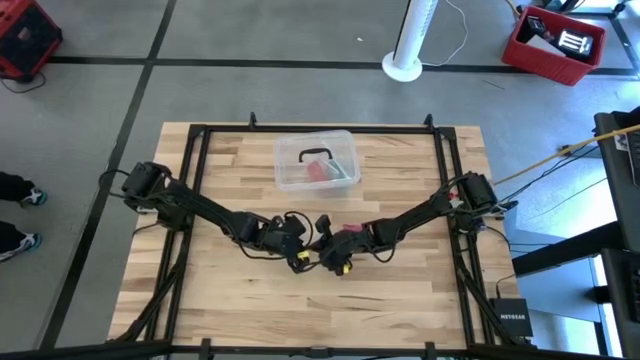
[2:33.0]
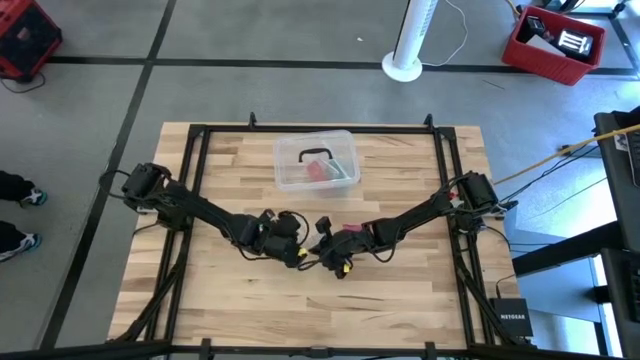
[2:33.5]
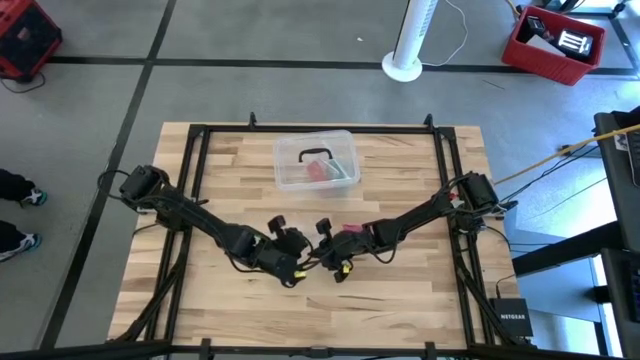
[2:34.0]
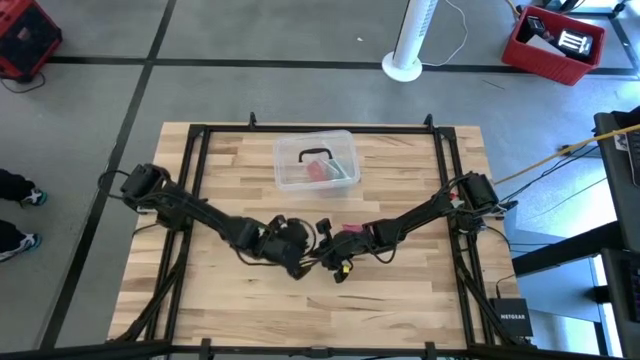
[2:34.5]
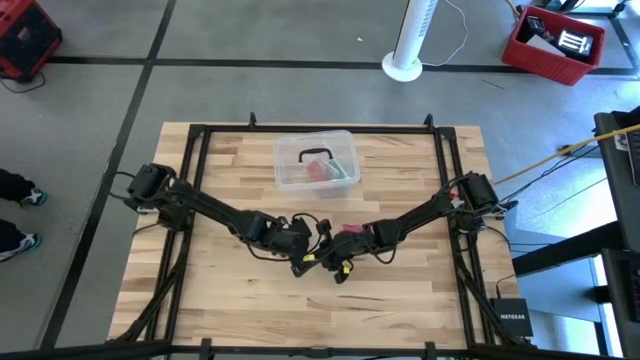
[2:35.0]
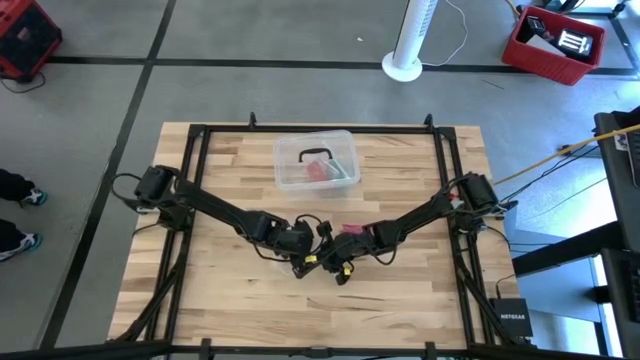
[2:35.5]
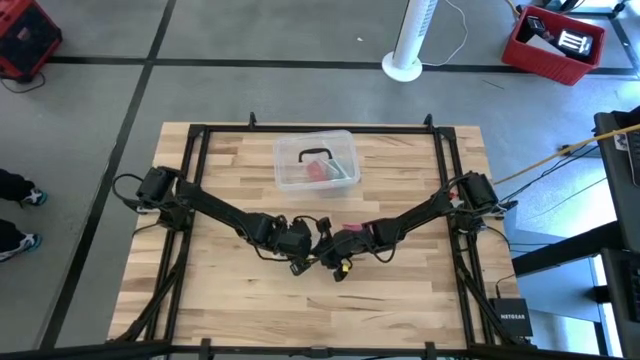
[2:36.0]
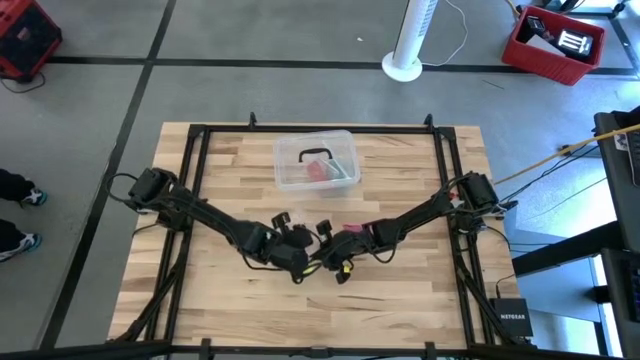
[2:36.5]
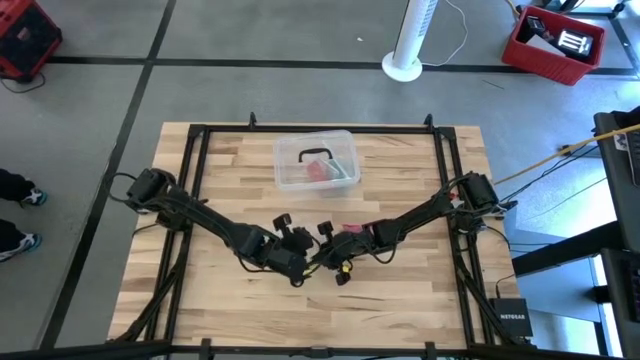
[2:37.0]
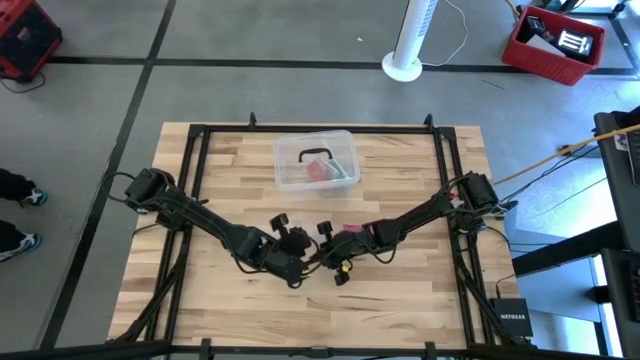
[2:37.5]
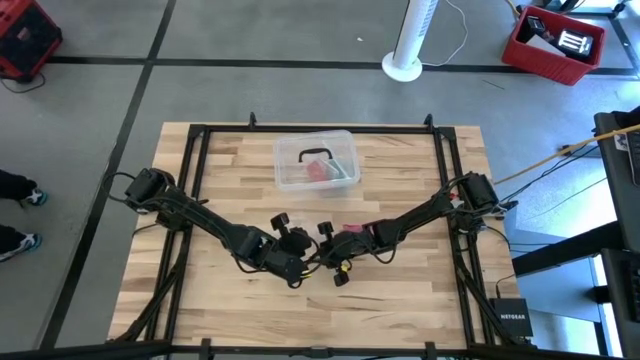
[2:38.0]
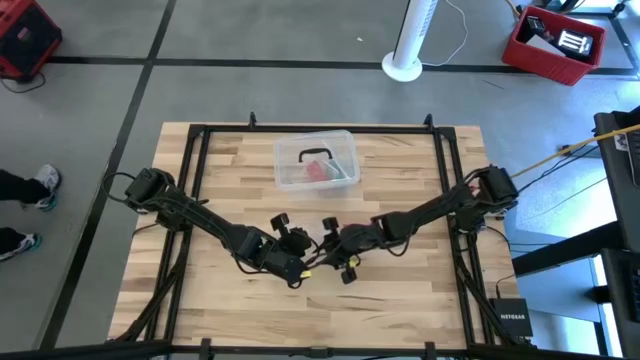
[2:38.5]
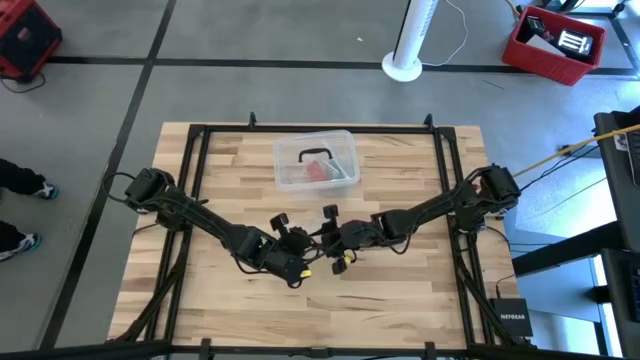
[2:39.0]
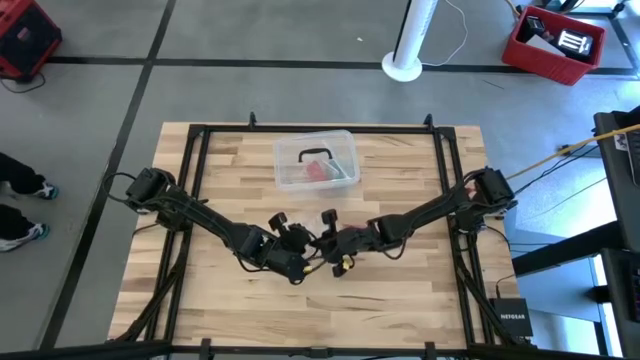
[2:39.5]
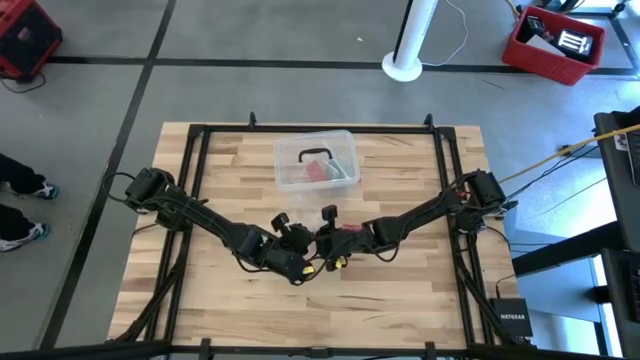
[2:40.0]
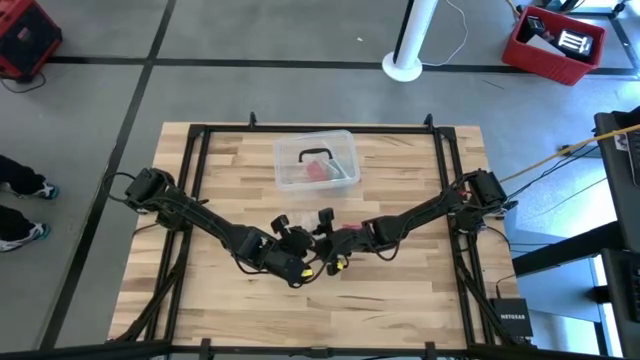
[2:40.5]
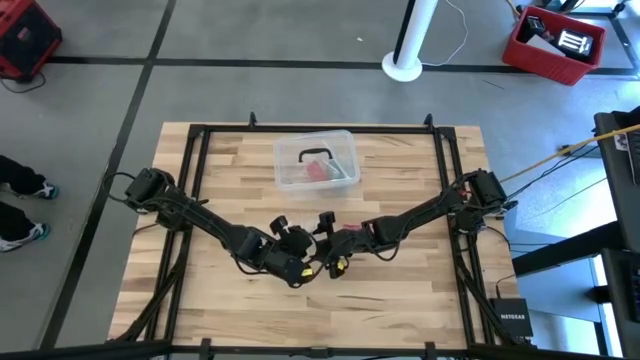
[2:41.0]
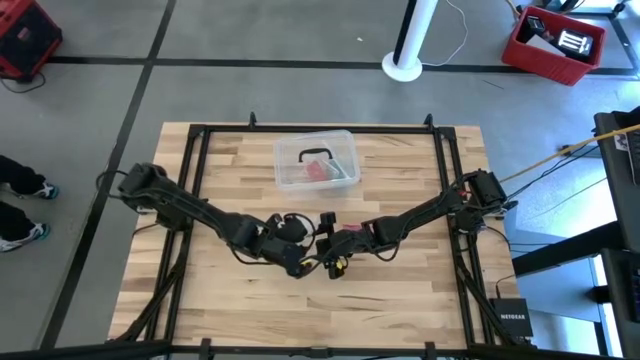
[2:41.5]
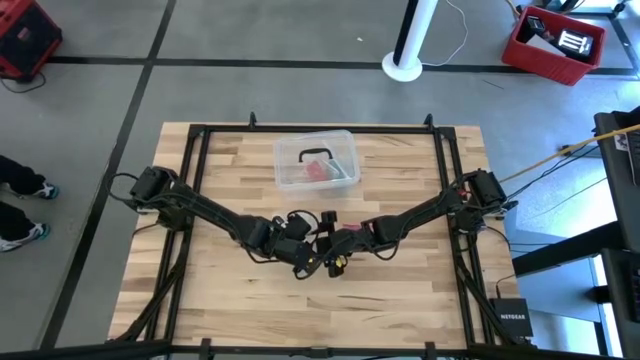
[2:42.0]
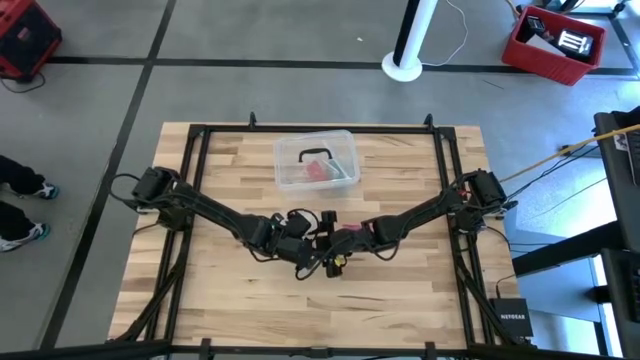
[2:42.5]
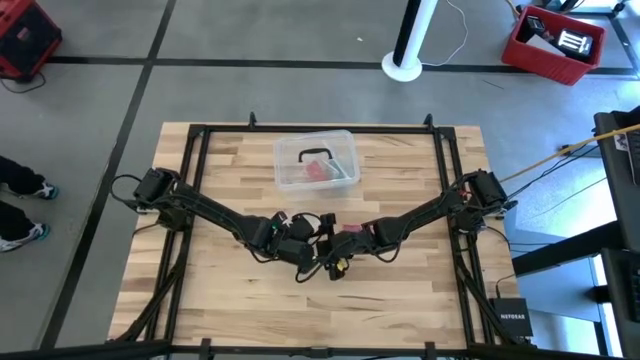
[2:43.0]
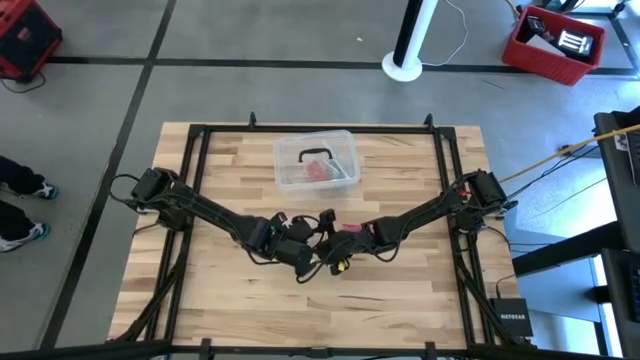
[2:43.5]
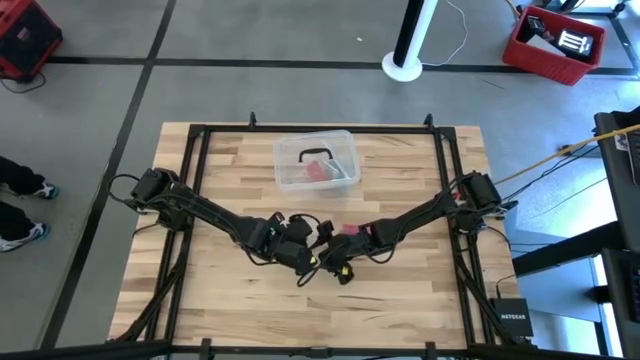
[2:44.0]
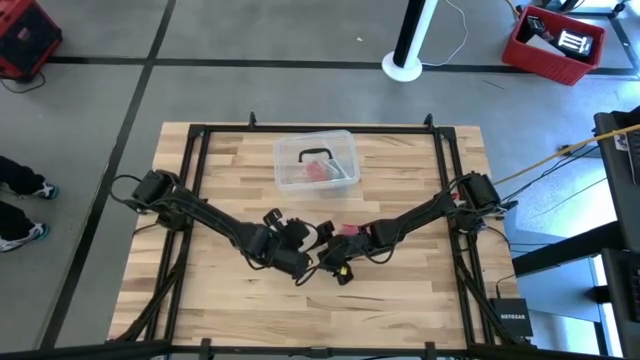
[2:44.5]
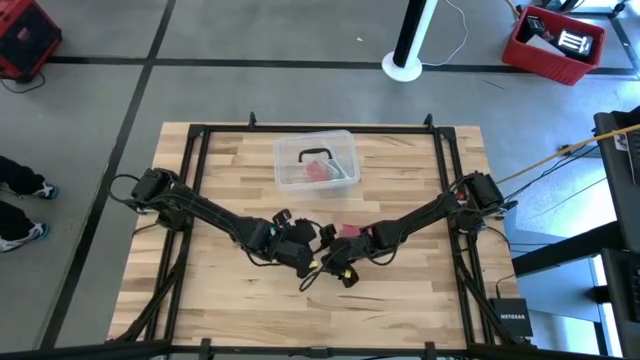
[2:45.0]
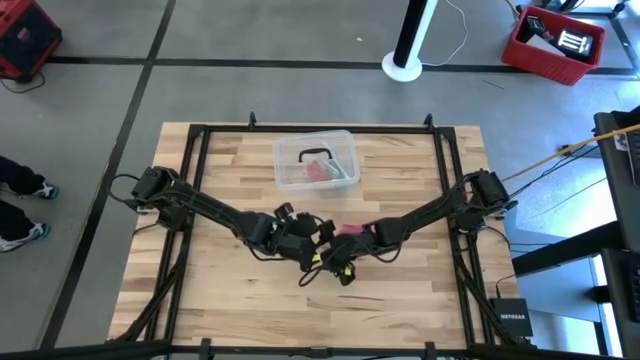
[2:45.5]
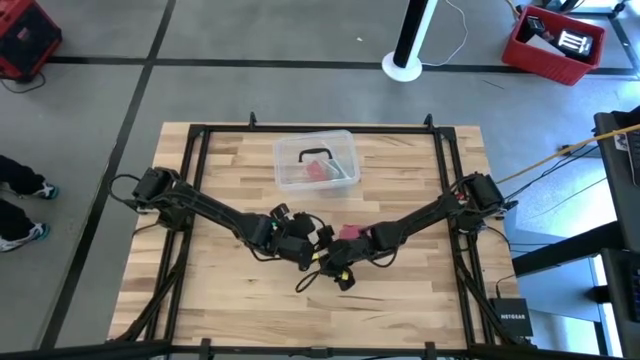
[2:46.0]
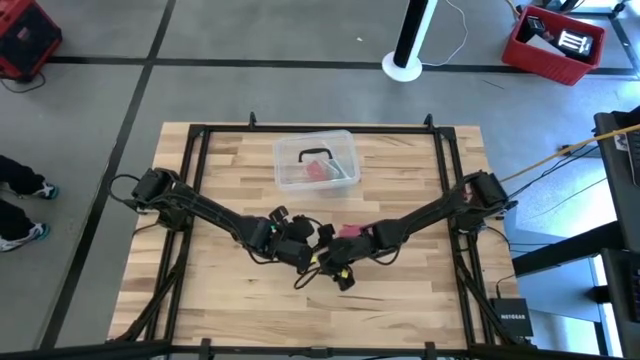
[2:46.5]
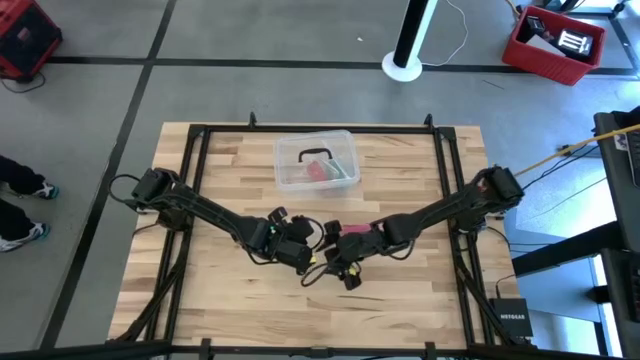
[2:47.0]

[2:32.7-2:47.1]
Task: Roll bandage
Open the transparent zip bag

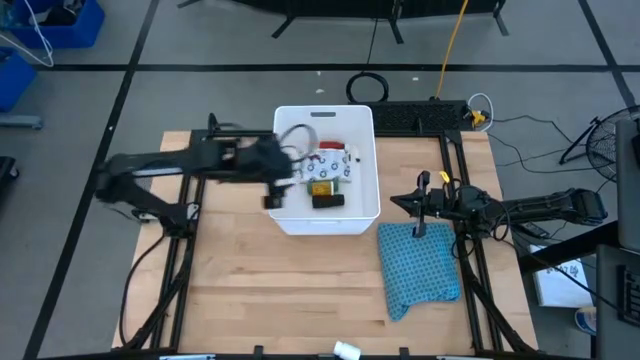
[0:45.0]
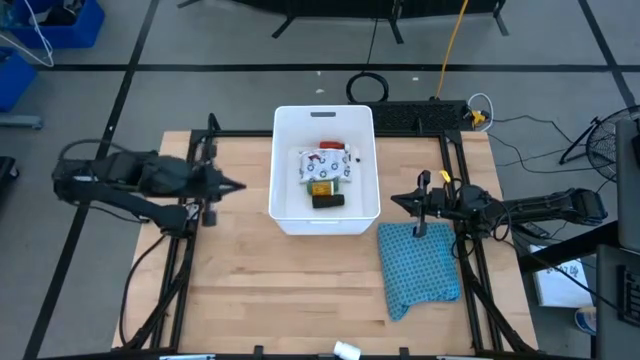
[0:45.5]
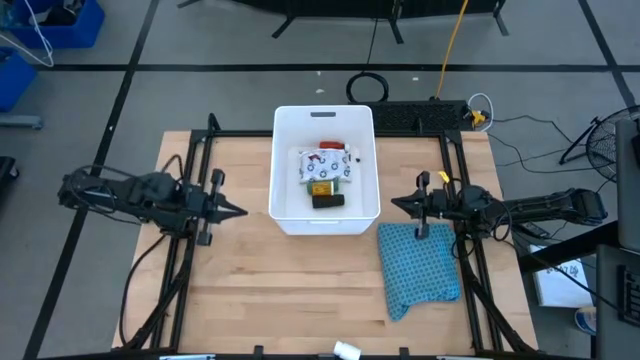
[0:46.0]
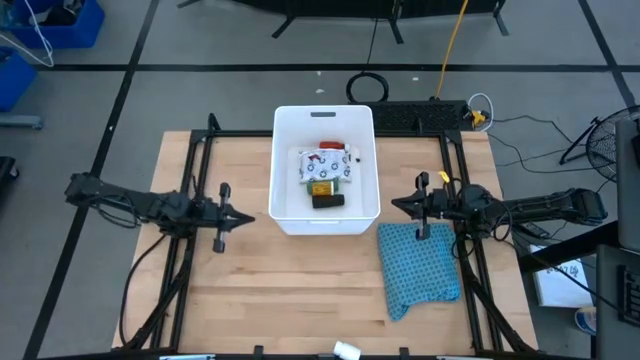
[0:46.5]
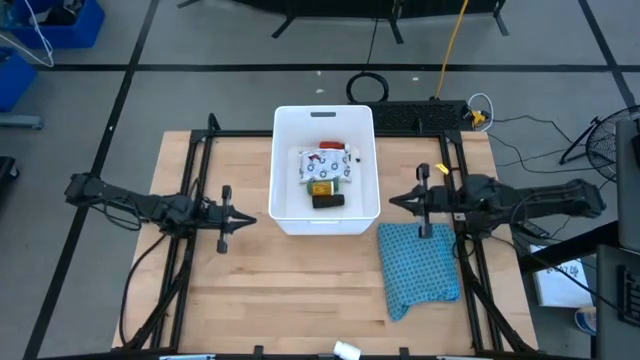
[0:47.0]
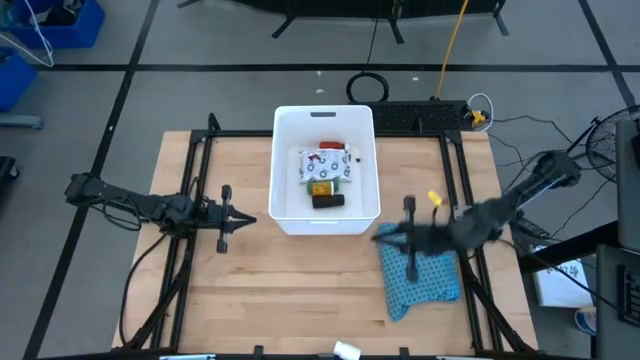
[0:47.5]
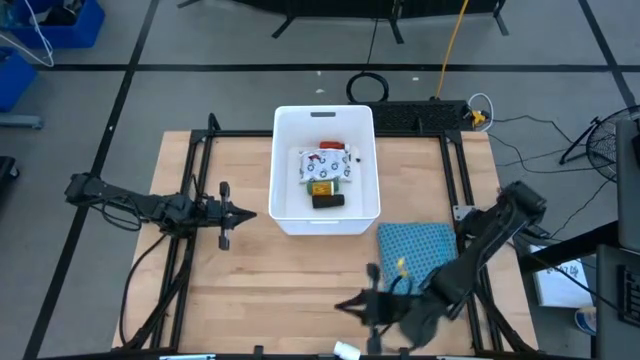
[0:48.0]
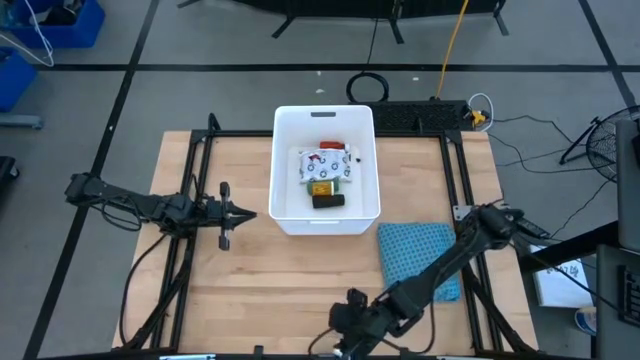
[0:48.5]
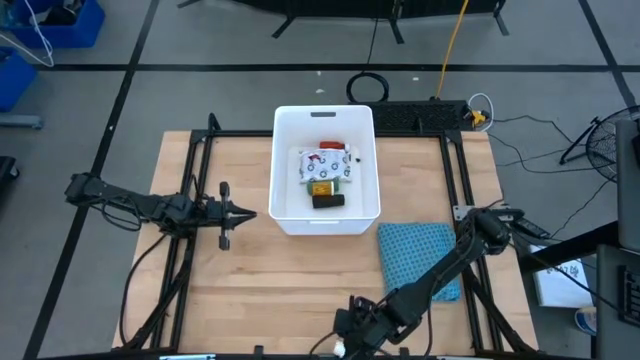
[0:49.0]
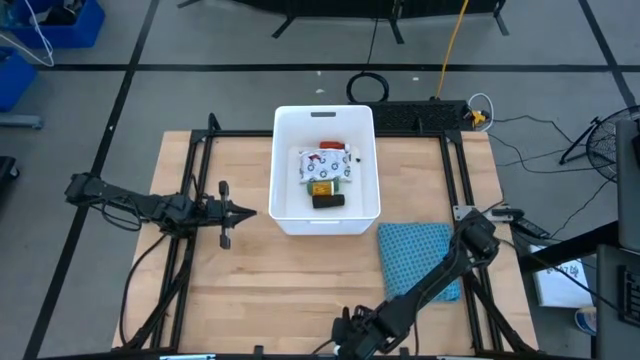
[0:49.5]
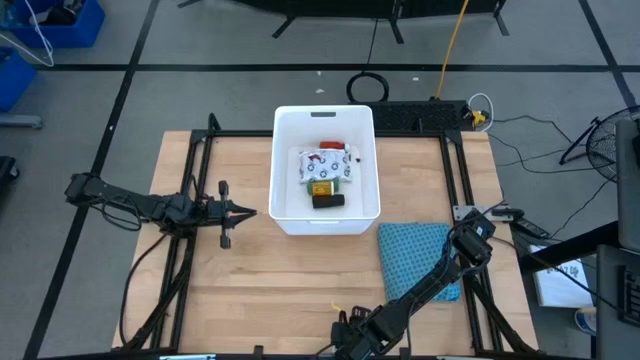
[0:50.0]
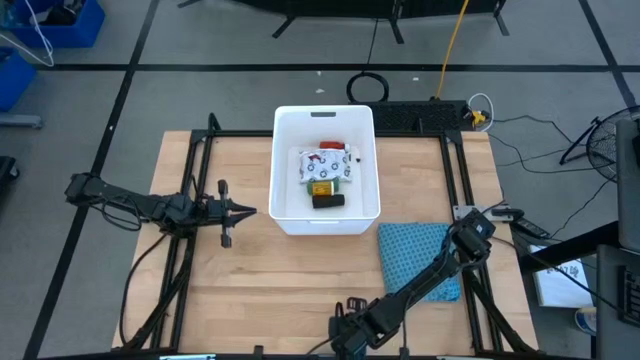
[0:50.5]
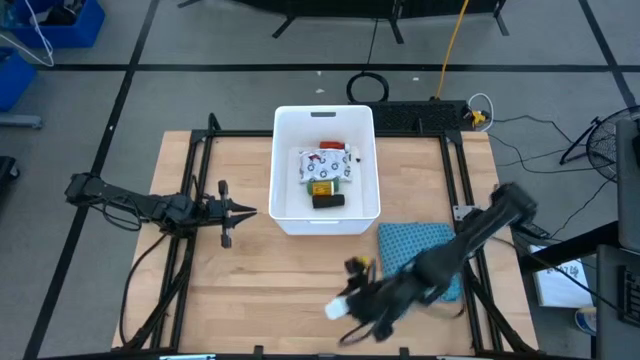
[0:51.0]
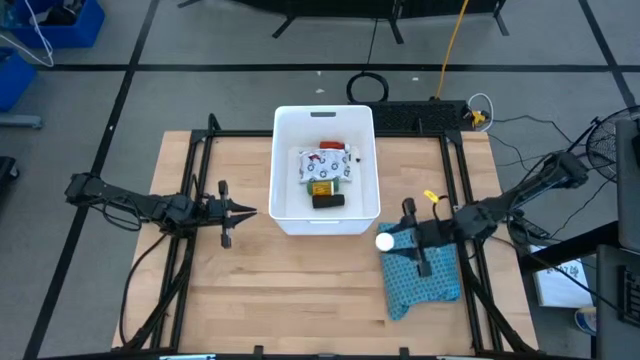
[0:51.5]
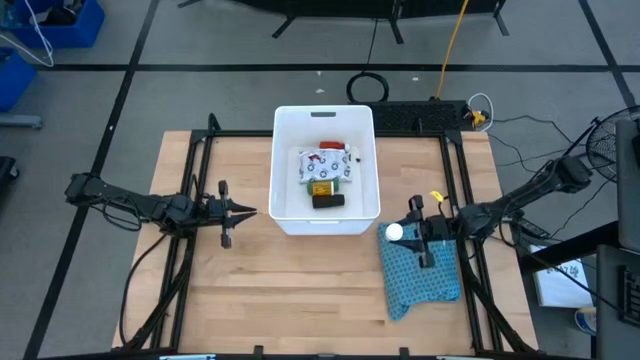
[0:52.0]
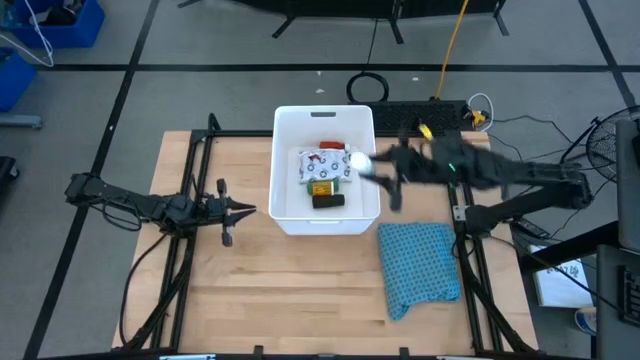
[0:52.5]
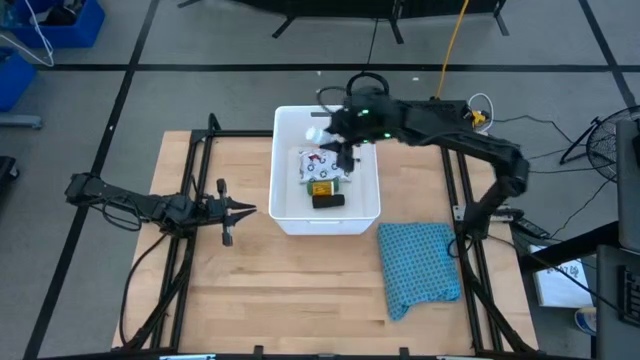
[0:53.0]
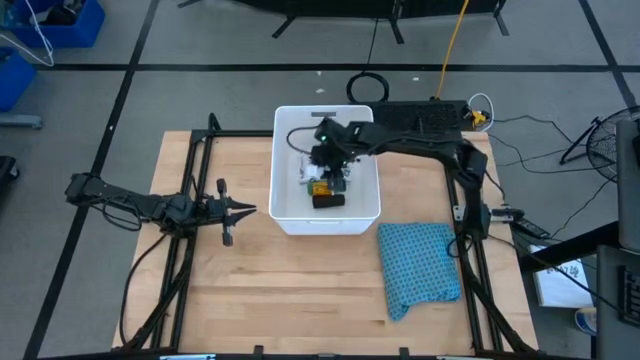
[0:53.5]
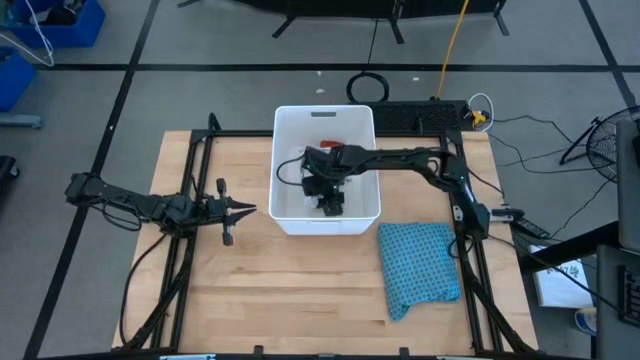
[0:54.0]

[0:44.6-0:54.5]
Task: Pick & place medical supplies in basket/bin
Put the white pill bottle into the bin
